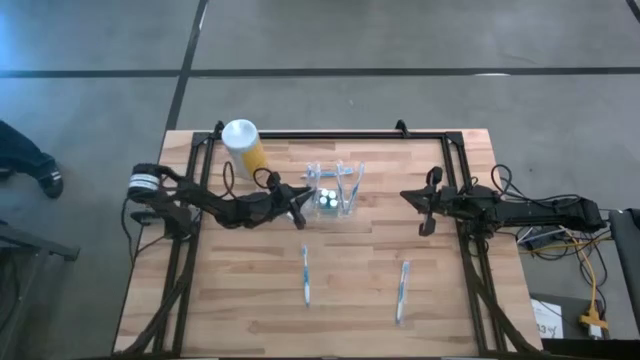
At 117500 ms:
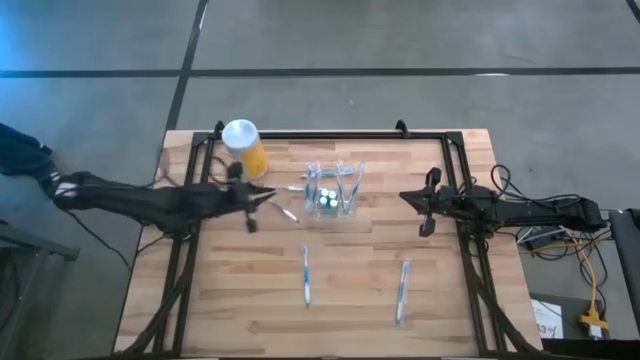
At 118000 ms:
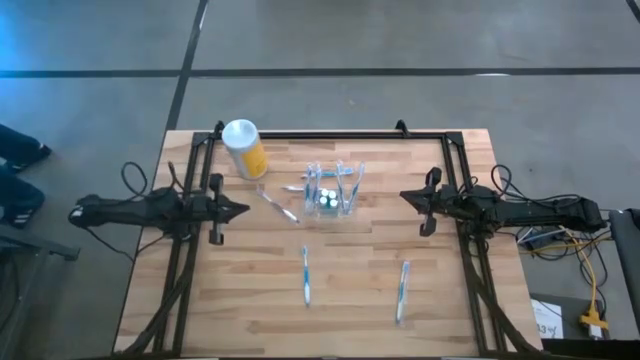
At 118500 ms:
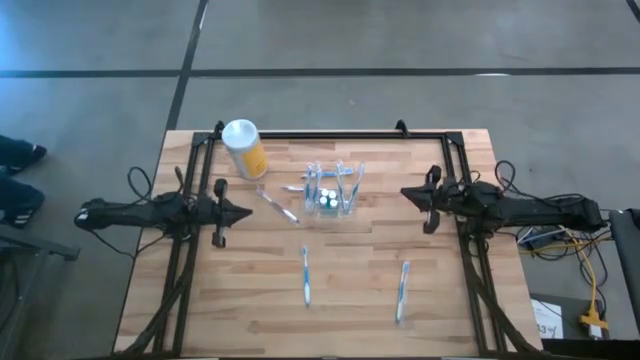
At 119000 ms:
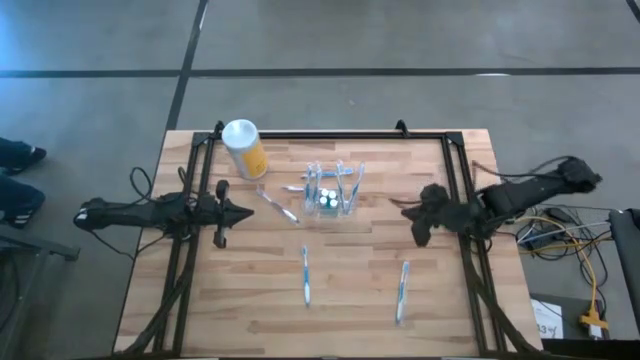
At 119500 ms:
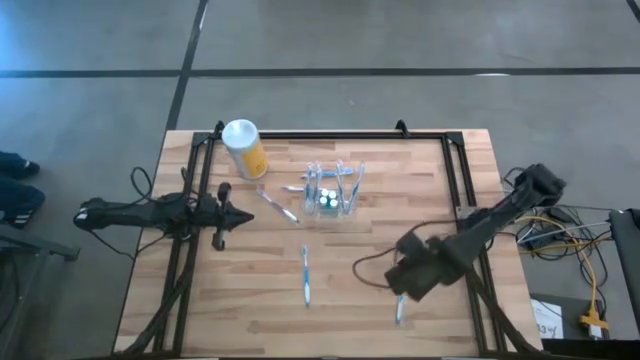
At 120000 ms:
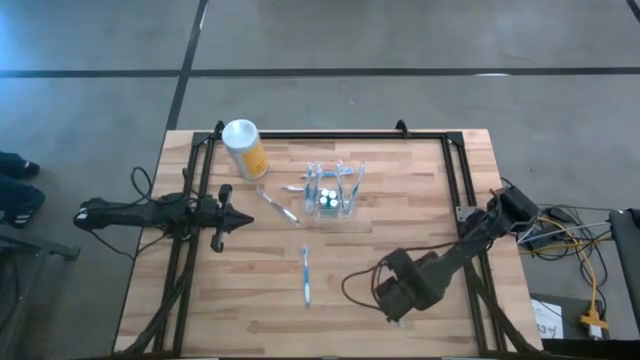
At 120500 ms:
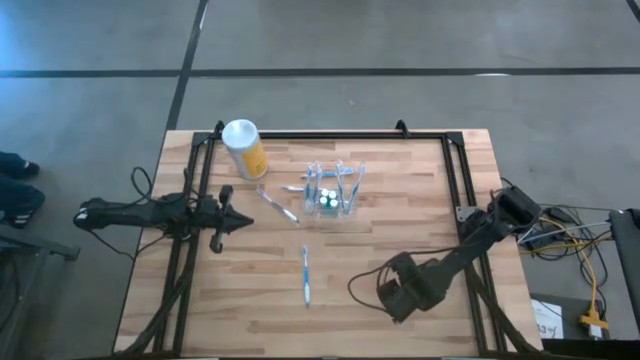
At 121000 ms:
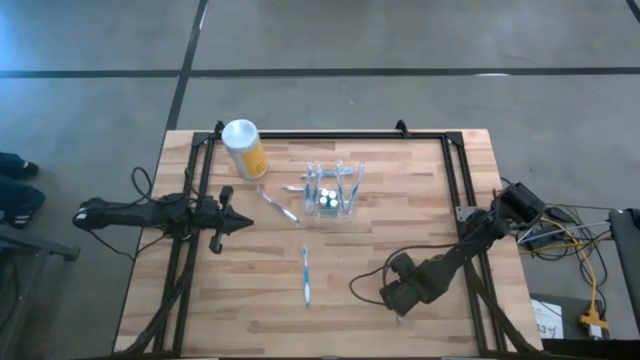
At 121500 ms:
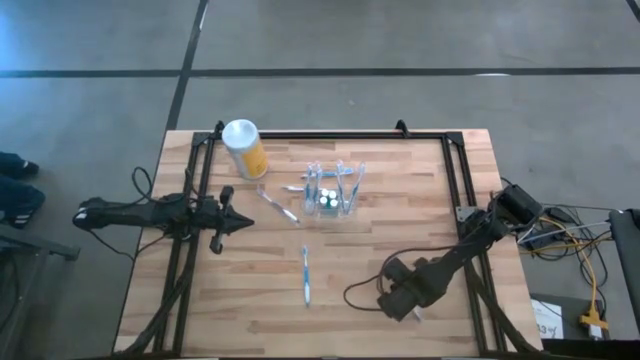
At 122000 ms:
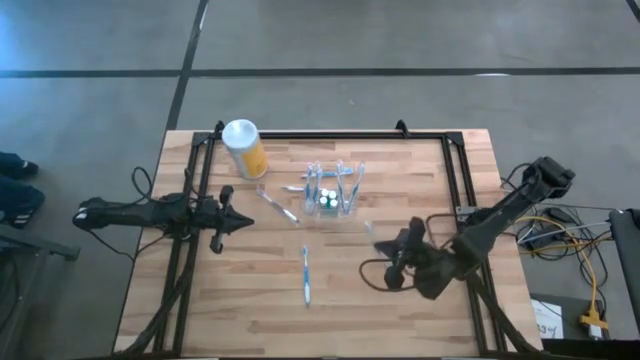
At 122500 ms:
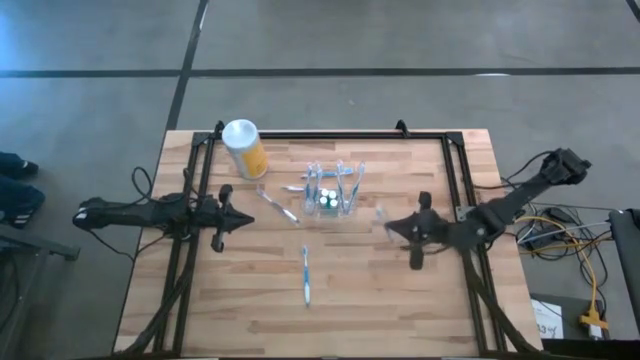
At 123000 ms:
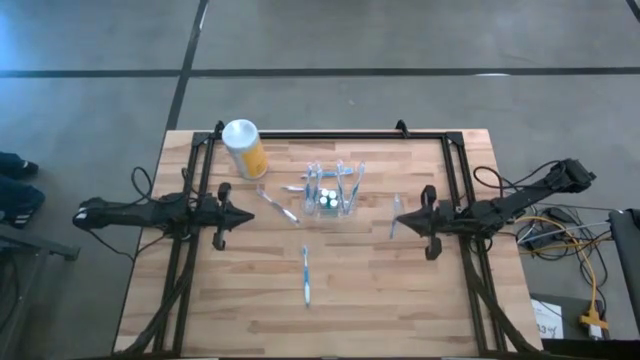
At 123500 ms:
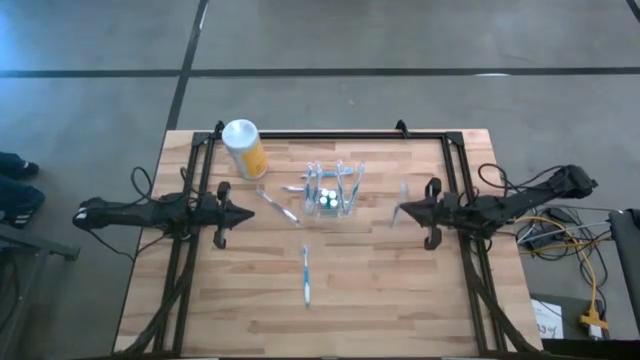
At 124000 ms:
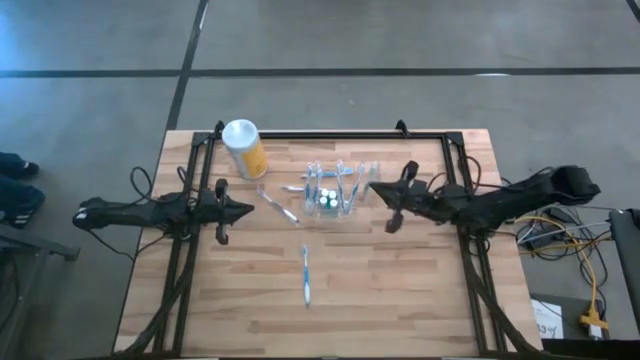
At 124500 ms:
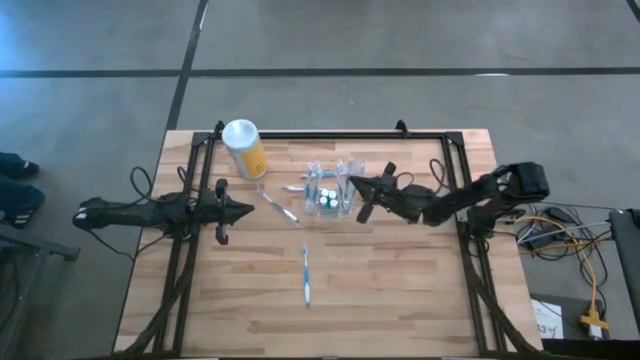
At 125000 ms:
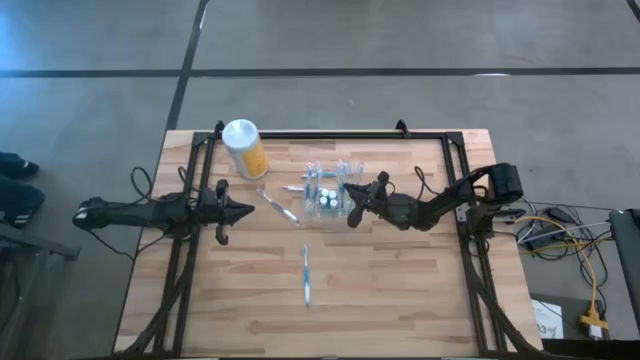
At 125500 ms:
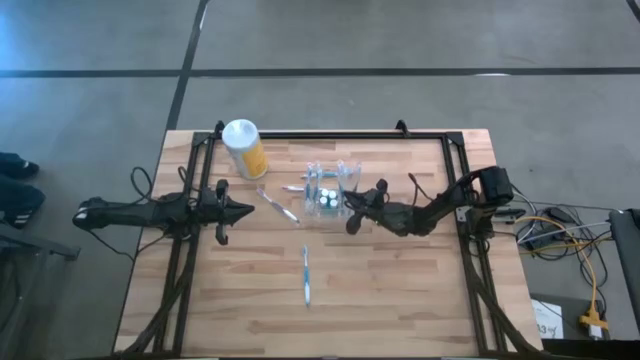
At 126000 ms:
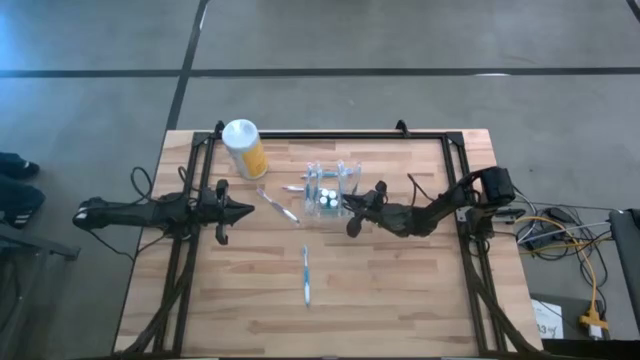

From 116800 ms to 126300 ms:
Task: Pick & Place toothbrushing station
Put the bottom right blue toothbrush into the right section of the transparent organizer

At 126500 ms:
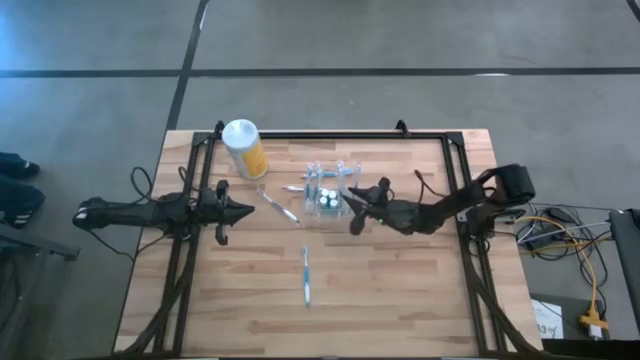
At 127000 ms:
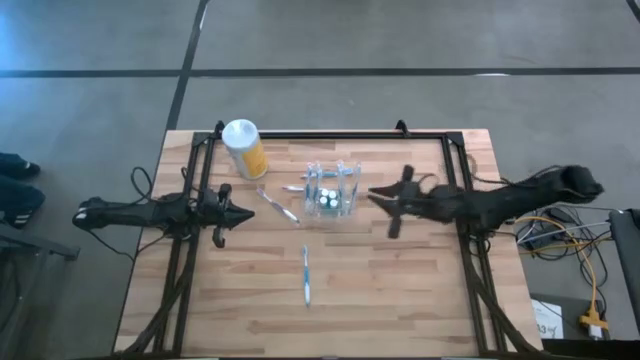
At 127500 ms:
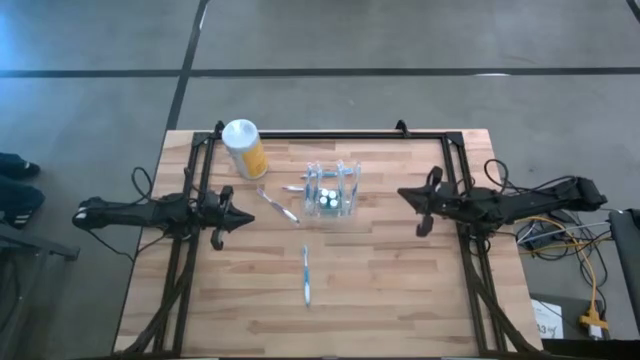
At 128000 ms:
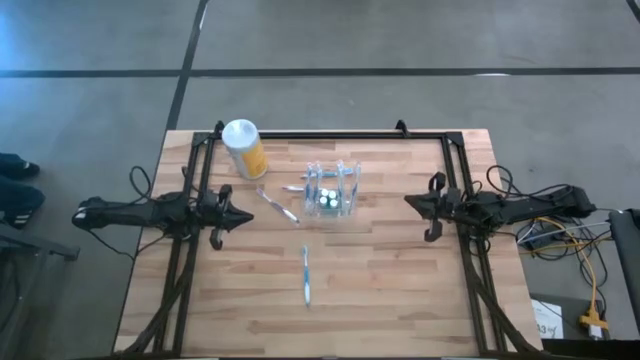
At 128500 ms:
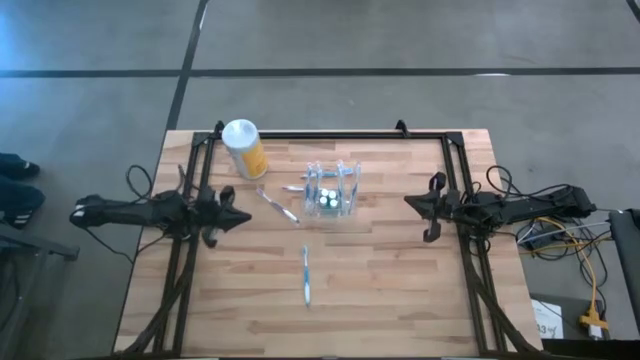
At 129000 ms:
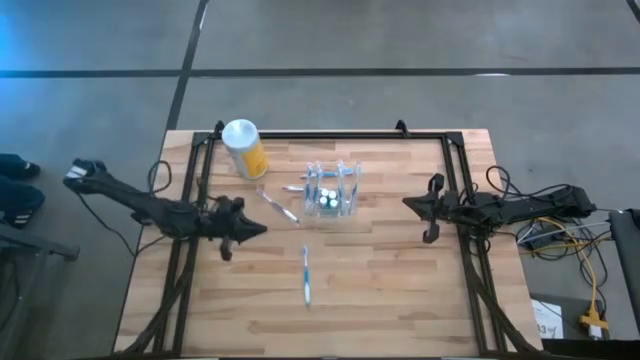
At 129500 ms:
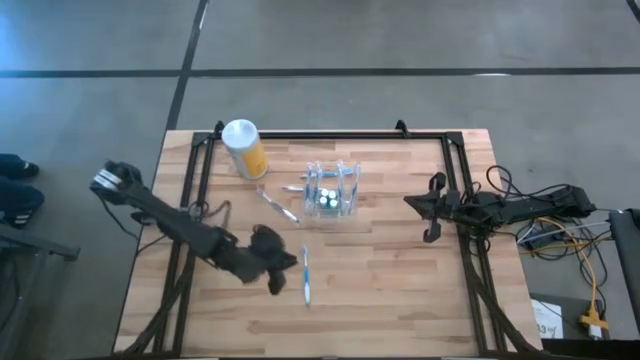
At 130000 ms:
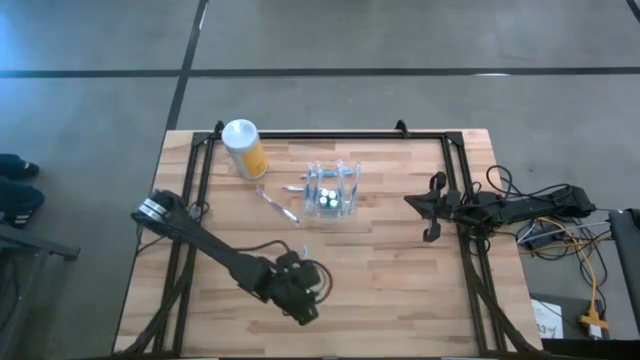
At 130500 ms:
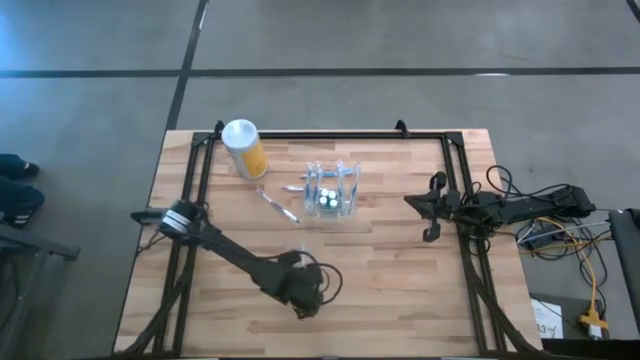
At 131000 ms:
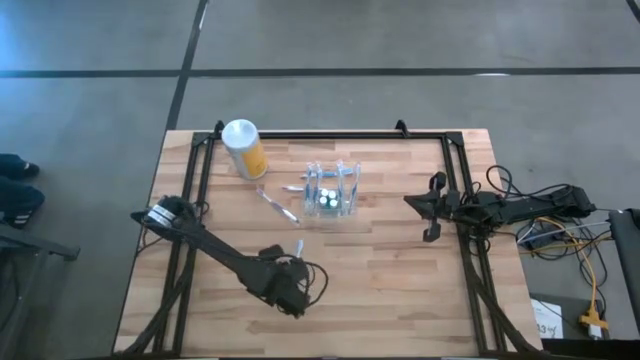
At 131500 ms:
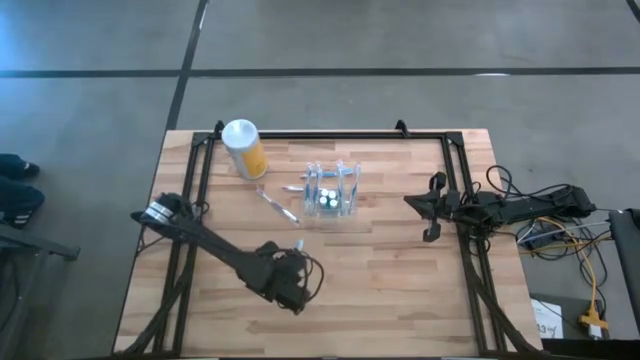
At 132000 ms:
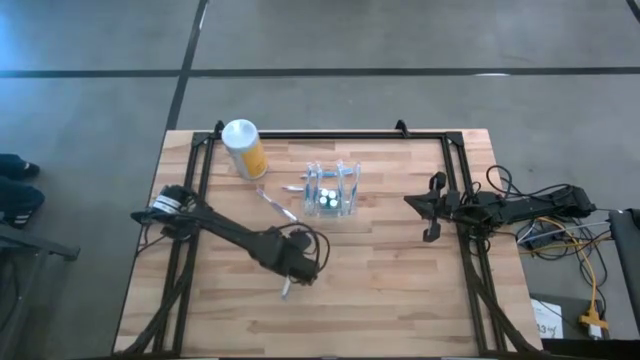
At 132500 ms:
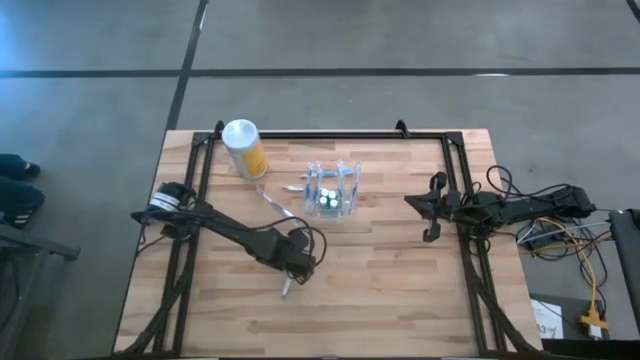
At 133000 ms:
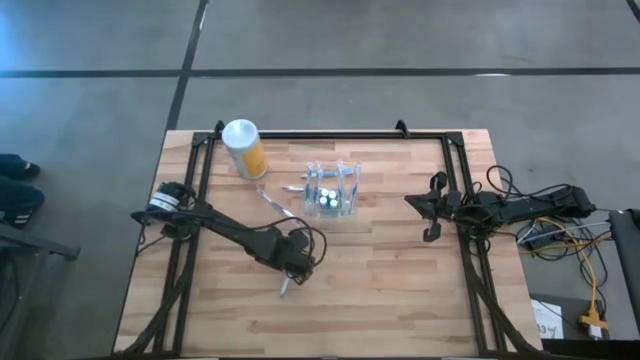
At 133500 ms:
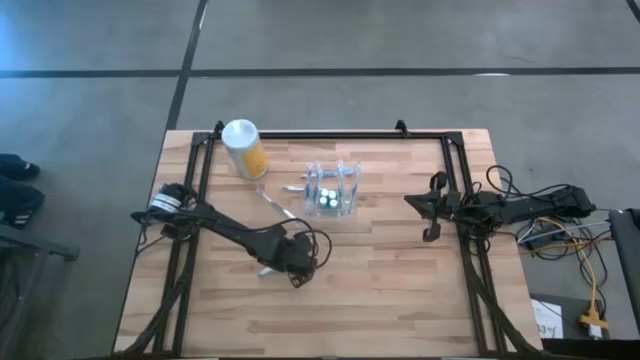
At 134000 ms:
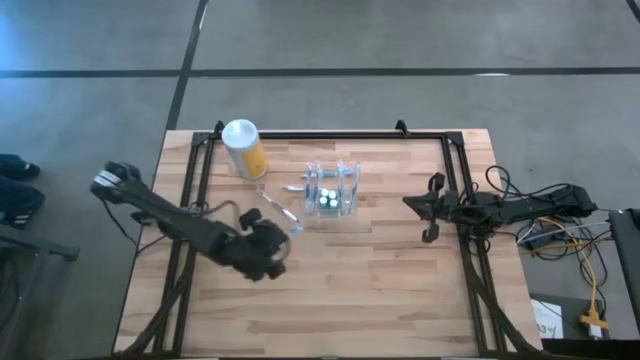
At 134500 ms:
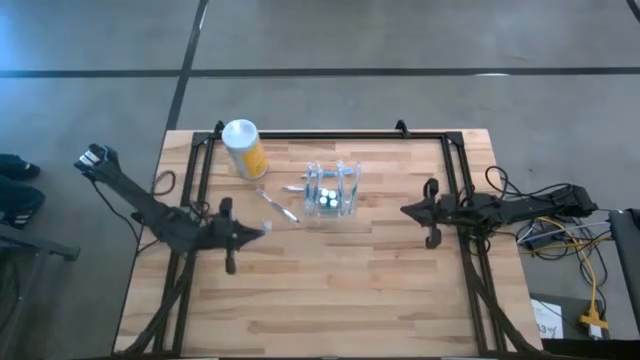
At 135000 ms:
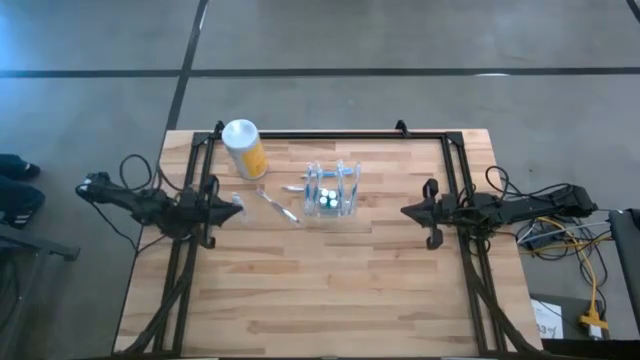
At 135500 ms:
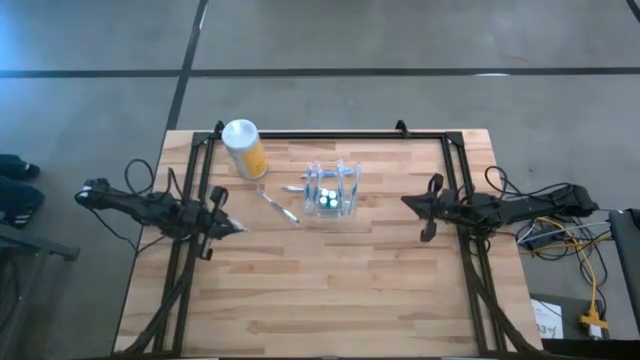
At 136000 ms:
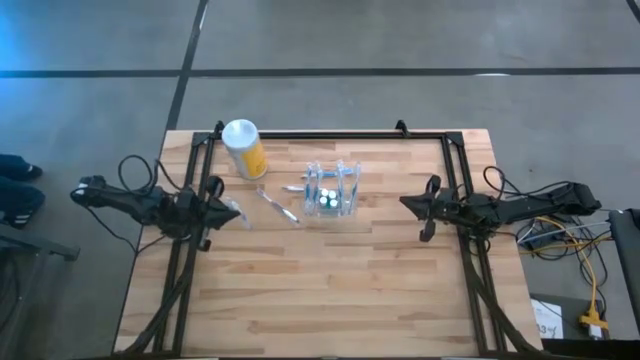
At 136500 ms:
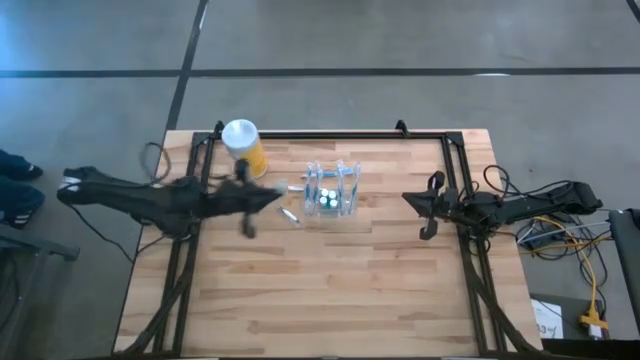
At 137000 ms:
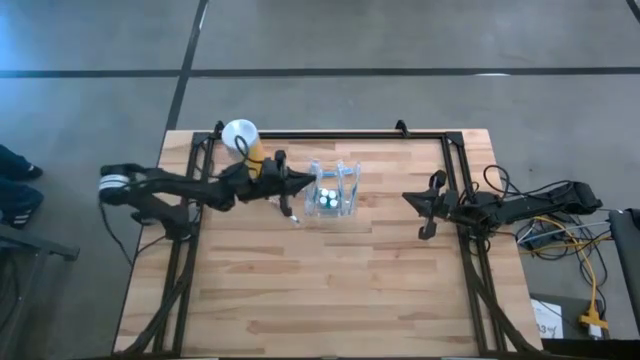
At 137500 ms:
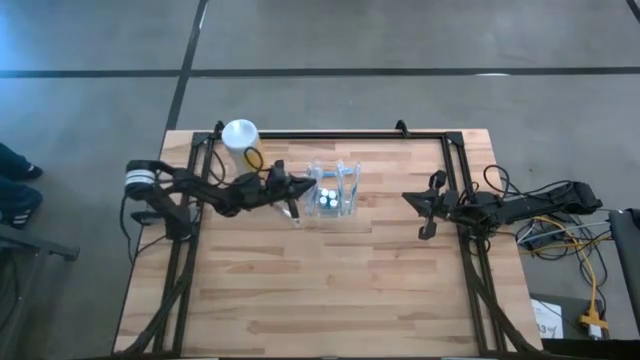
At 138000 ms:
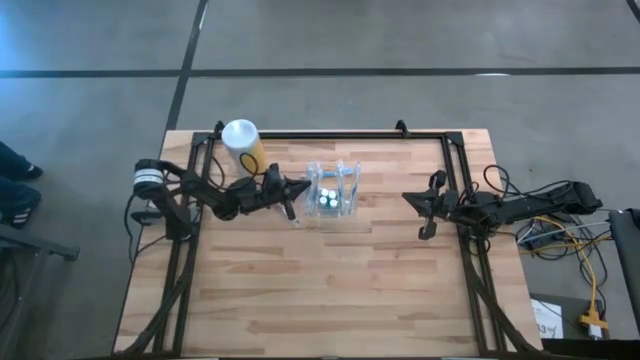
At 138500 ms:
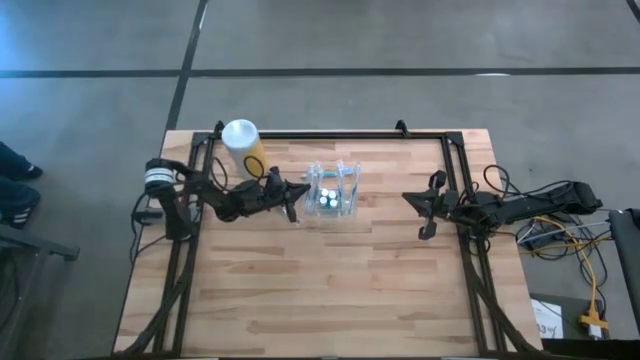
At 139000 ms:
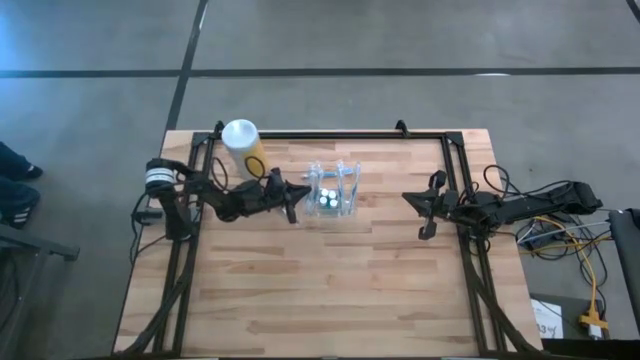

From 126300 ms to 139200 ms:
Put the bottom blue toothbrush into the left section of the transparent organizer
